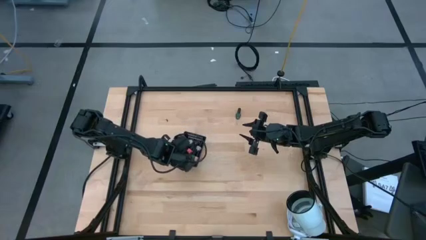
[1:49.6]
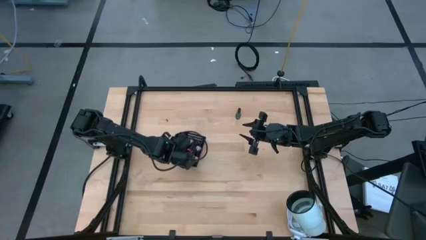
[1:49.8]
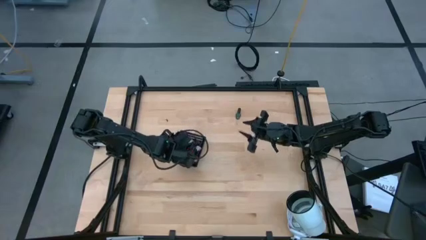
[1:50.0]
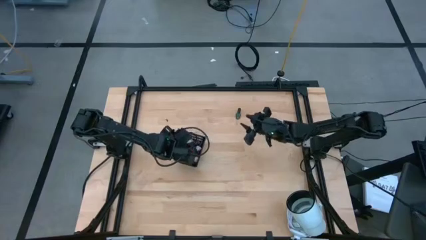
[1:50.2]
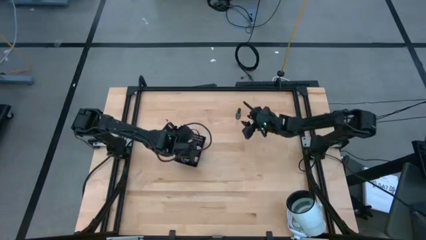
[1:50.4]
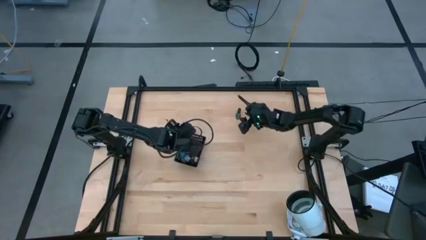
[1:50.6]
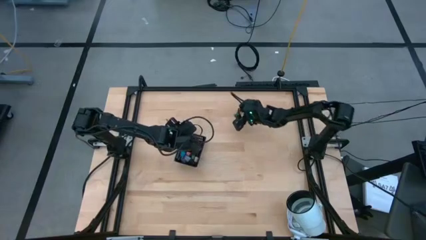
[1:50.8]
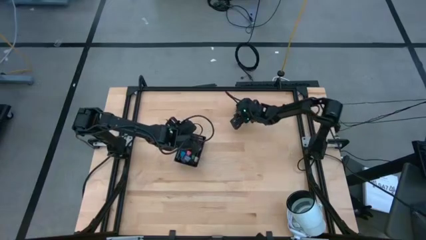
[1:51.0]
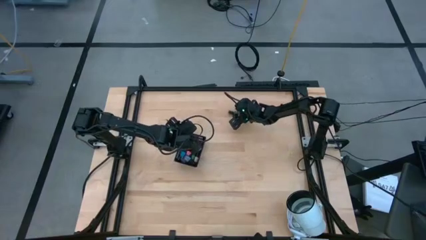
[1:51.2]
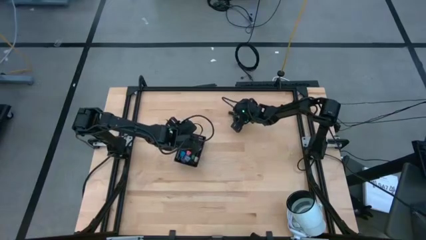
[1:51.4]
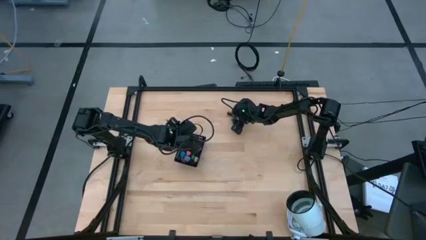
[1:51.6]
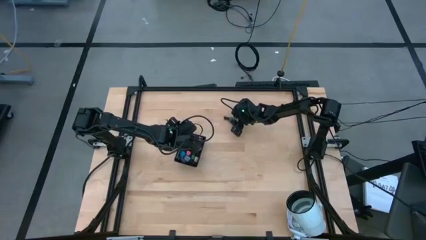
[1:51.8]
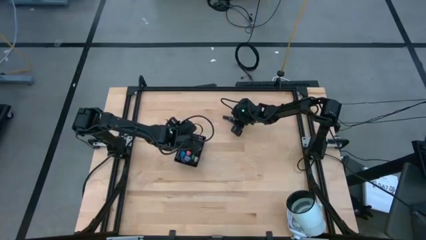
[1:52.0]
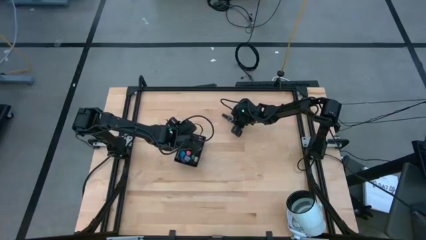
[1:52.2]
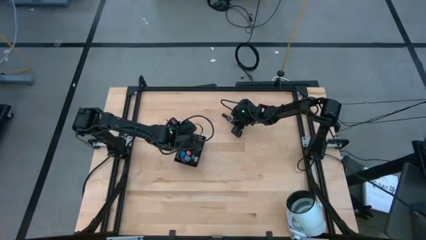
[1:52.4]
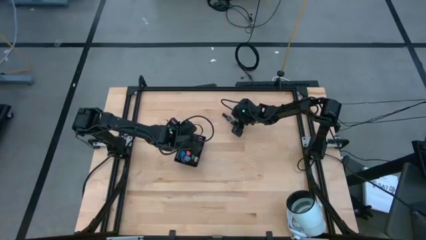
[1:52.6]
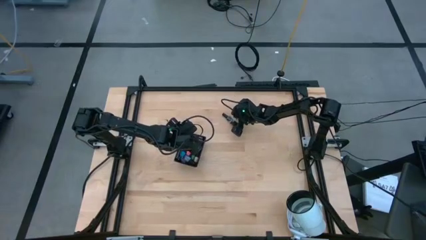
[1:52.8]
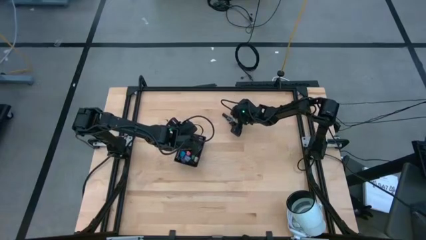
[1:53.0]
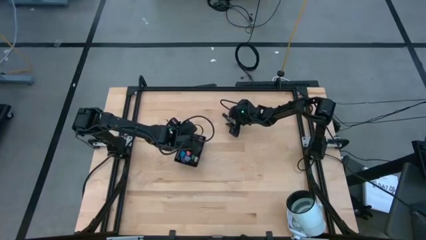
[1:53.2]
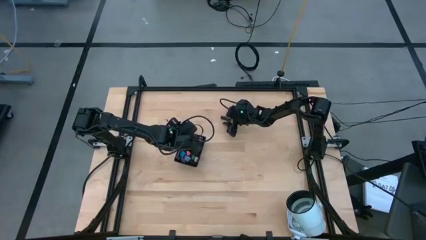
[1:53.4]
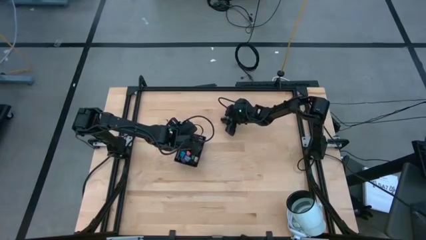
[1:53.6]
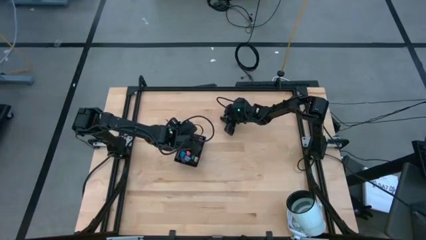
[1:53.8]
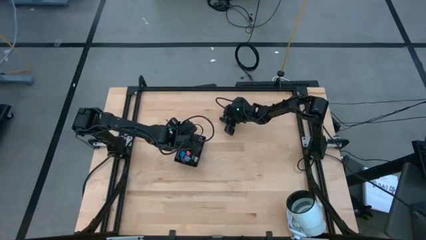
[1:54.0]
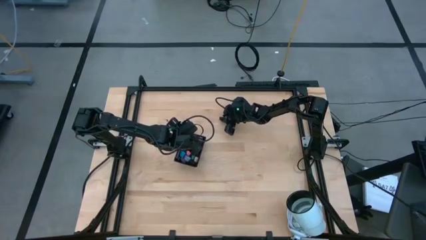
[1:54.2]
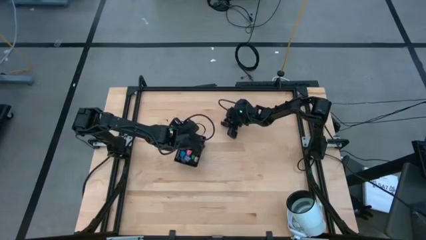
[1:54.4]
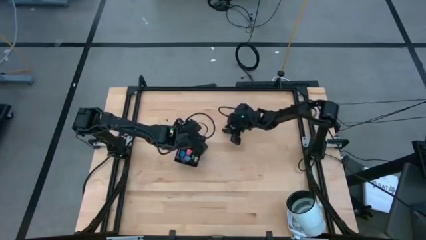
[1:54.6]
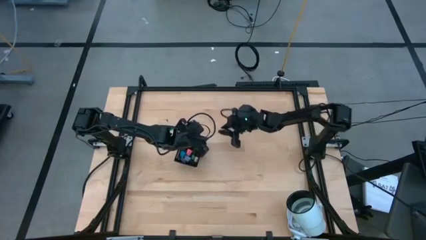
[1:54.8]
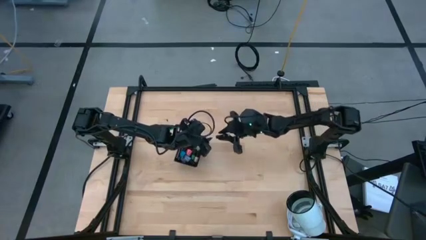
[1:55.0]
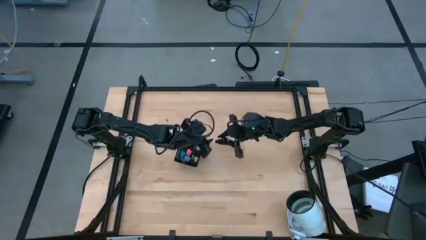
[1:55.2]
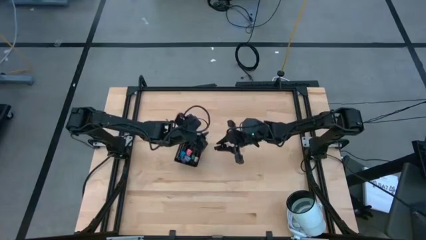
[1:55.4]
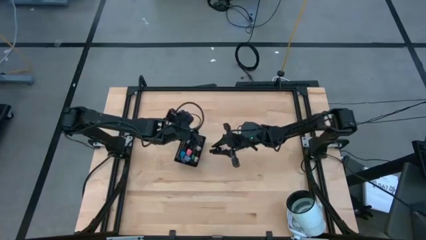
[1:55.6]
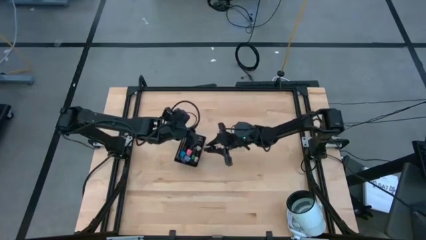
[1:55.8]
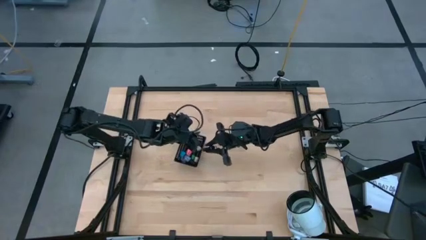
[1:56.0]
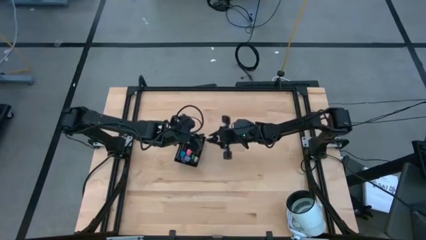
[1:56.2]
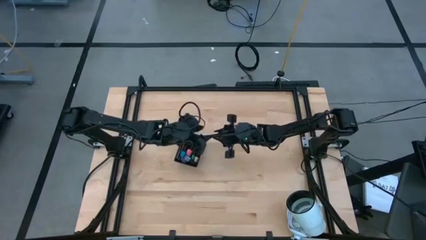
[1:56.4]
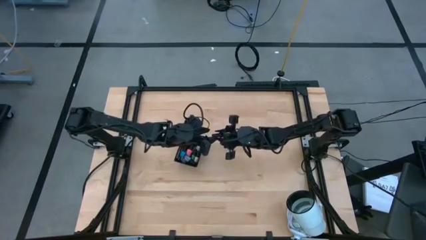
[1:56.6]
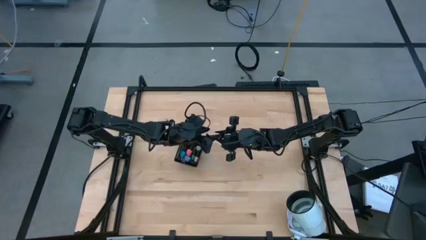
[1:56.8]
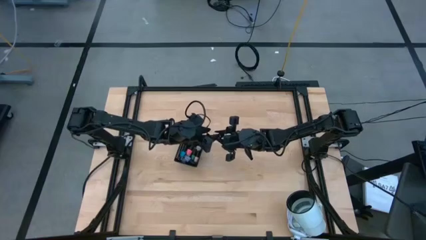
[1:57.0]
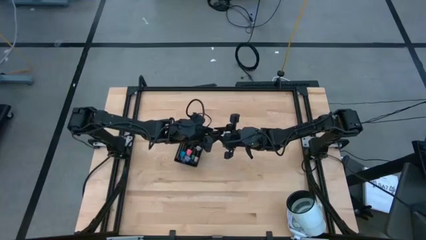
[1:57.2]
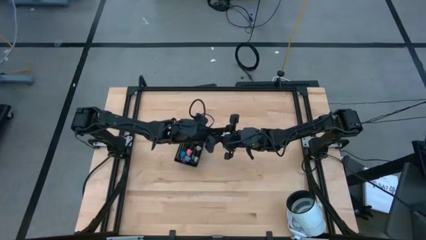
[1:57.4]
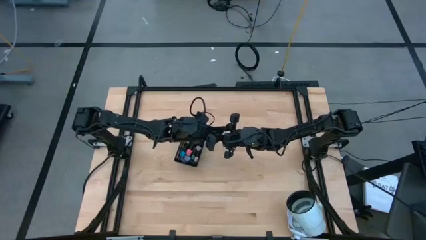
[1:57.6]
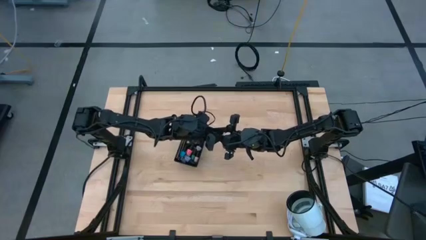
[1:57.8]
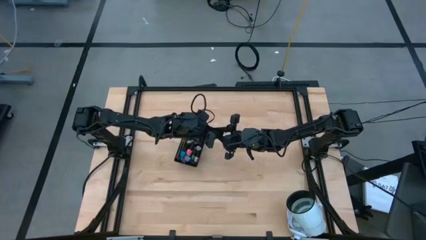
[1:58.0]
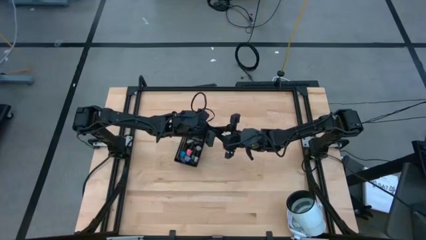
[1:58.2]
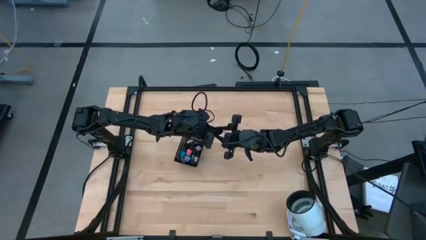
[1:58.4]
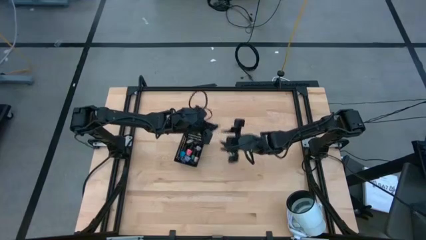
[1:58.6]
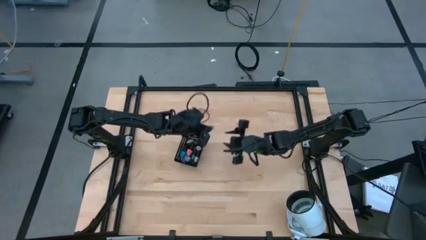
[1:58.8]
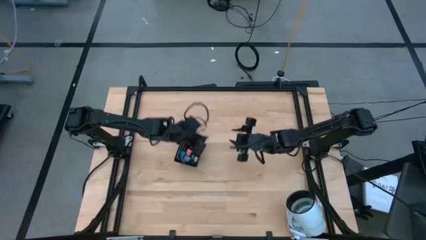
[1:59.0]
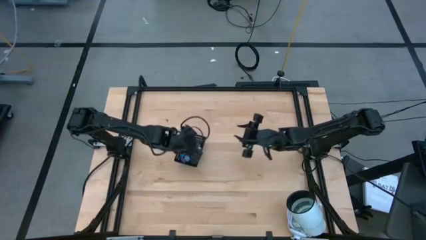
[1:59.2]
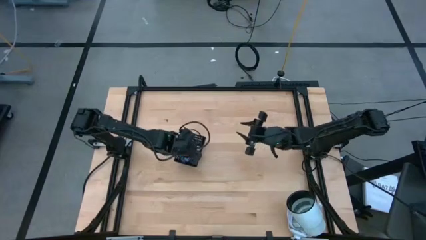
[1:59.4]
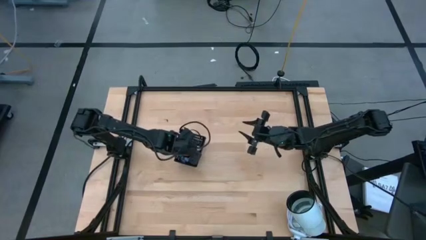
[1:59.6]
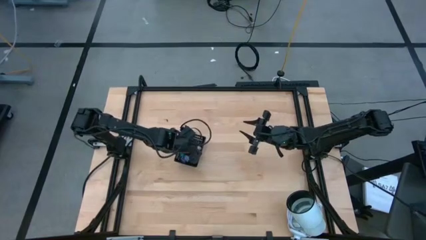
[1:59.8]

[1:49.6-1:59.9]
Task: Pick & Place Nail Polish
Put the dark green nail polish into the basket

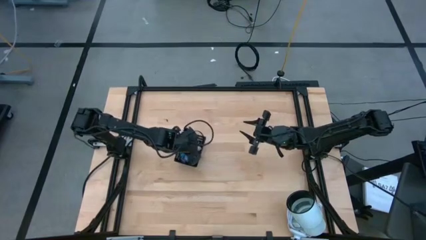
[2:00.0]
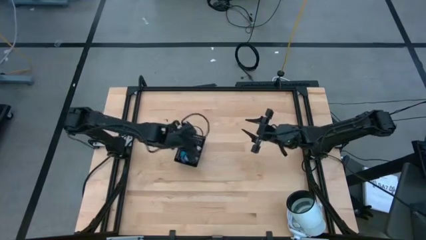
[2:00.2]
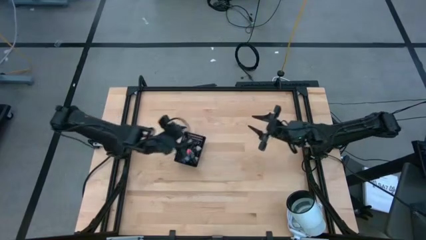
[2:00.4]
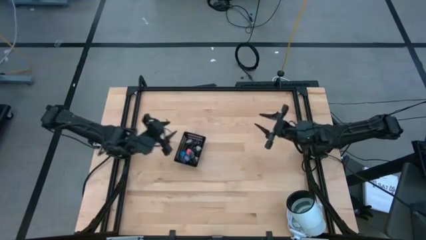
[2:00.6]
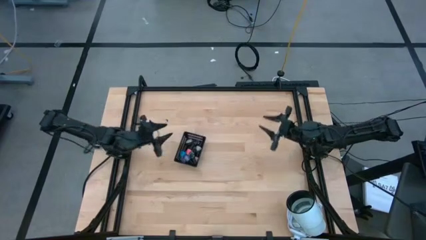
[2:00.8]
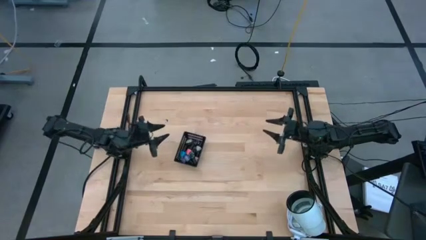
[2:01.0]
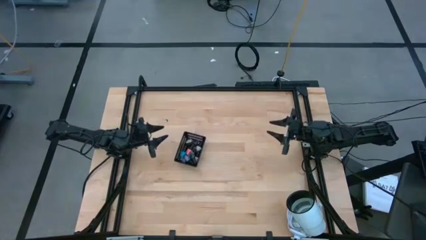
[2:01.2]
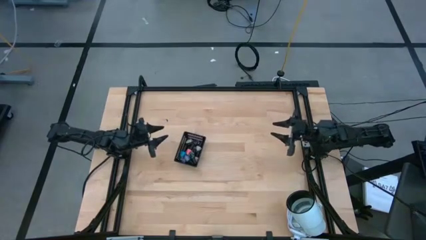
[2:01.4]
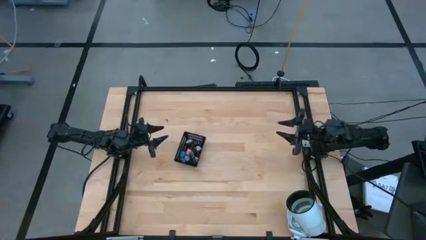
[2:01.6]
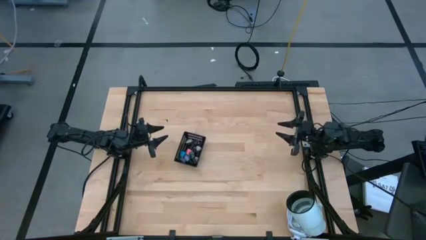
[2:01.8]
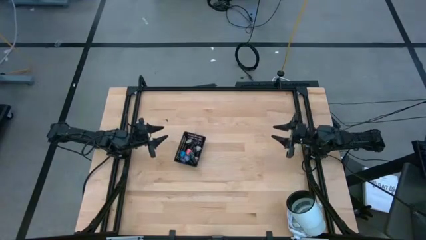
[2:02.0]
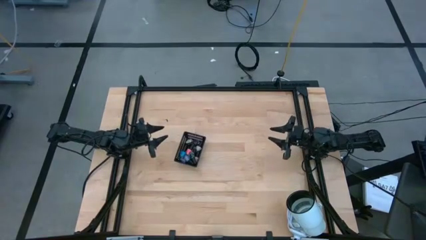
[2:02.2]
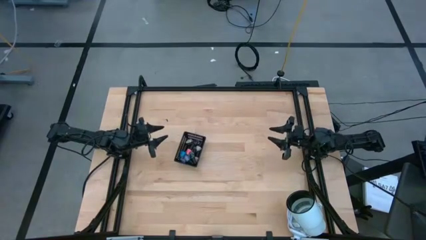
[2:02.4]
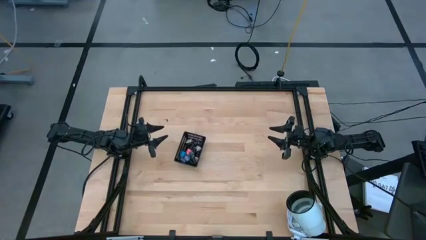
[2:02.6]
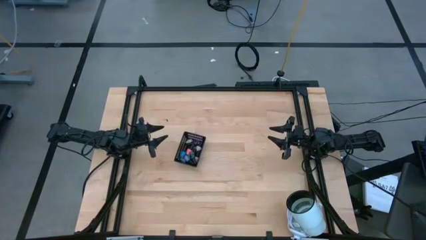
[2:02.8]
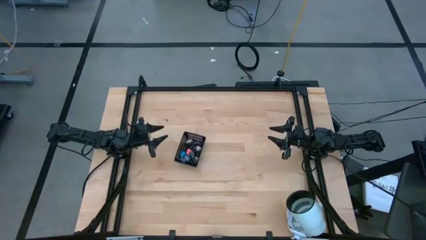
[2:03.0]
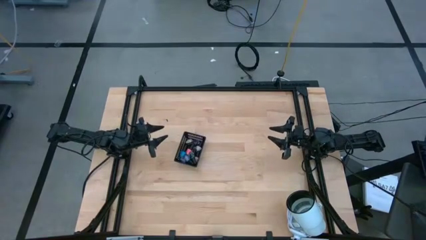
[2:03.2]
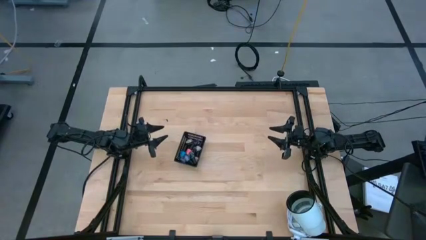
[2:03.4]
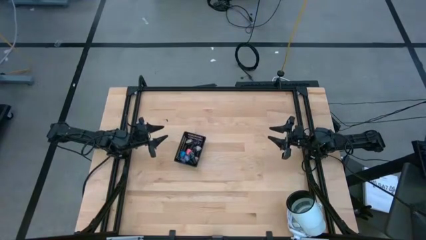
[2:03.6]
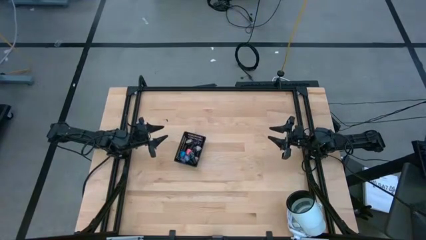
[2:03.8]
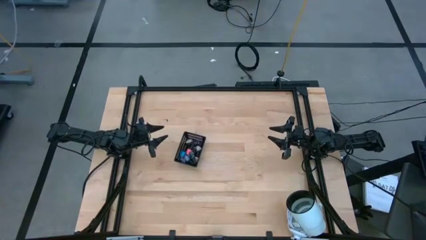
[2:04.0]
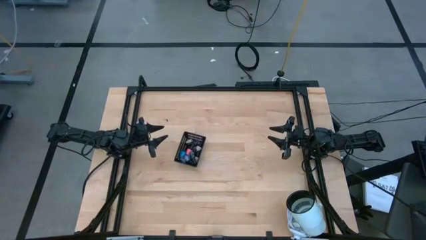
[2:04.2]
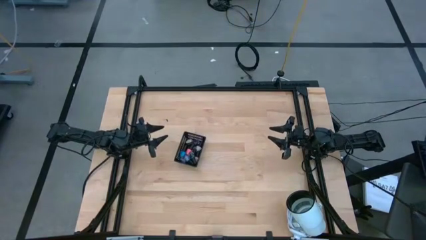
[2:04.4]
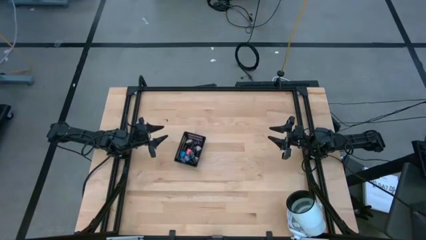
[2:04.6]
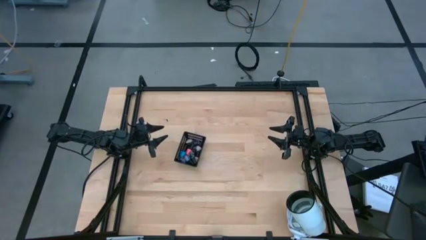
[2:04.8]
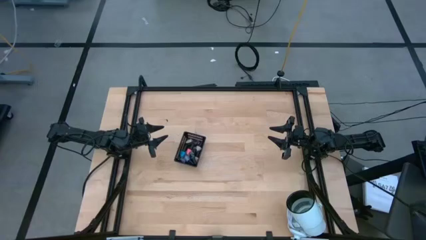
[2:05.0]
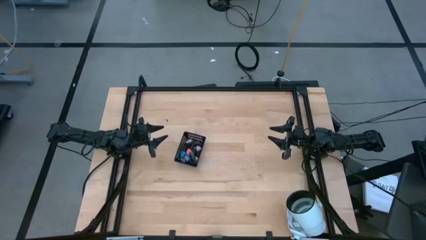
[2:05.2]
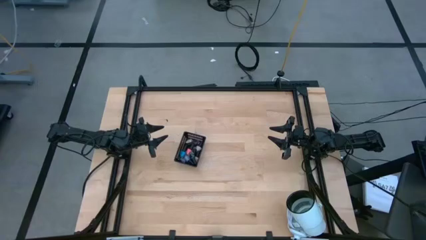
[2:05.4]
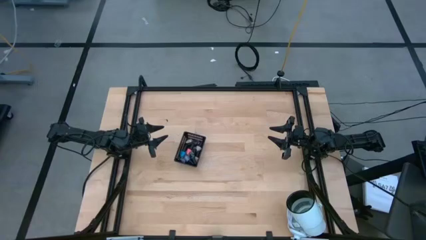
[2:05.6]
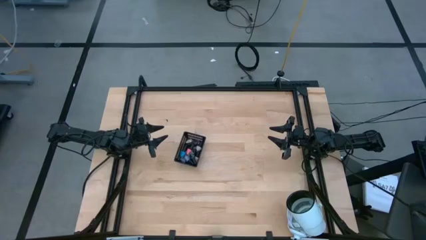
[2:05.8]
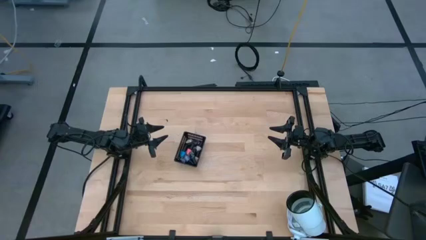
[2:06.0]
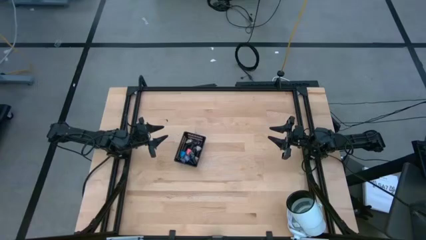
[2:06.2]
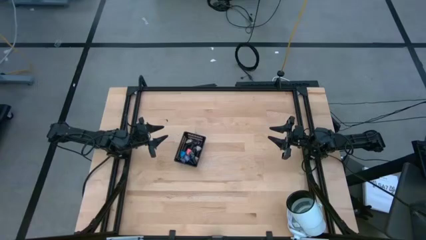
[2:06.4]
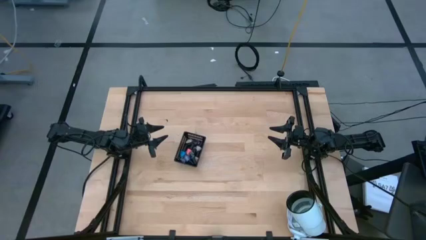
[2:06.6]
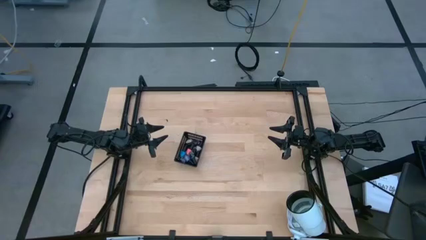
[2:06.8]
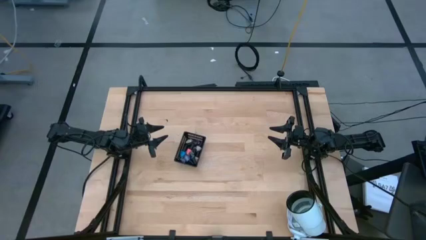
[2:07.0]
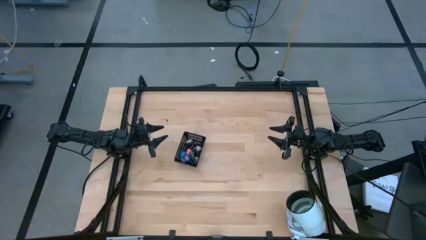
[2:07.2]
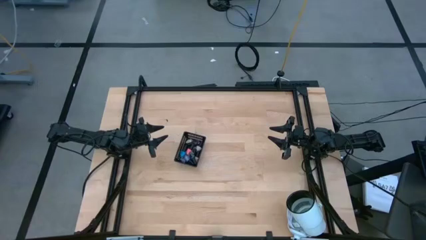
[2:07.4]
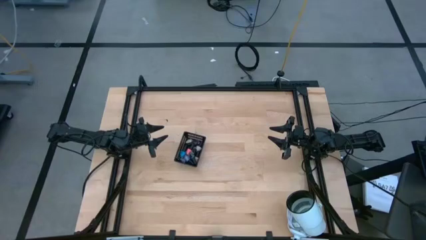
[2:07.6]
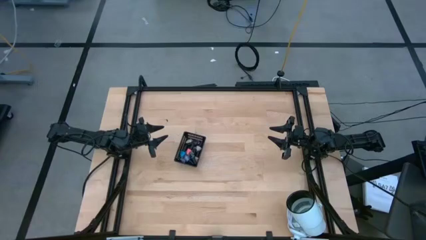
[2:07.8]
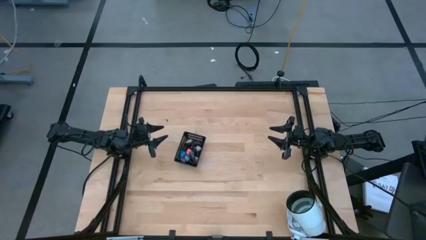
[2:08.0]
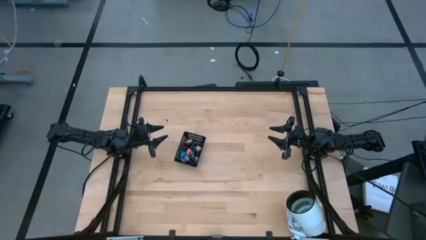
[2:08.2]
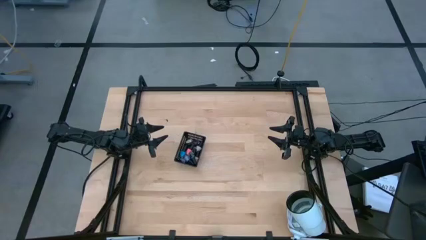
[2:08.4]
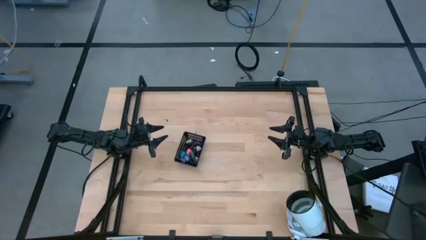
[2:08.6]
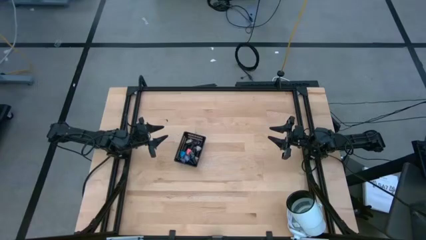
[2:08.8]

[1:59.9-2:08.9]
Return to Home Position
